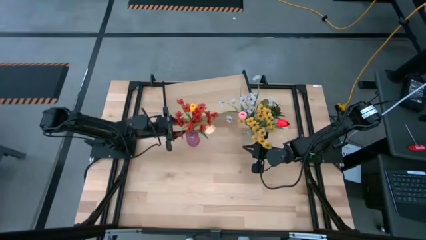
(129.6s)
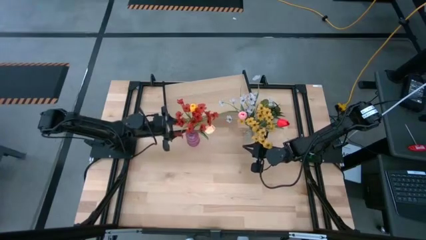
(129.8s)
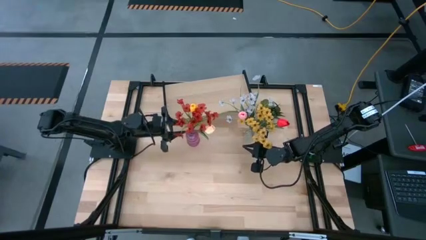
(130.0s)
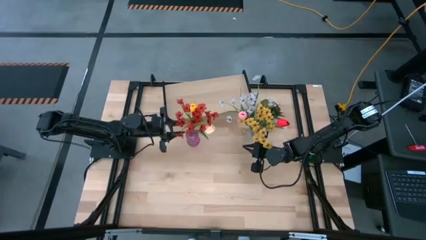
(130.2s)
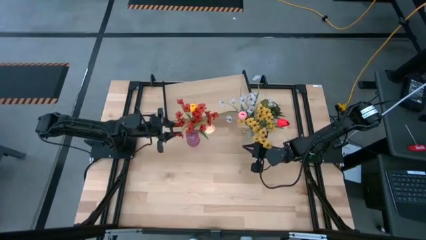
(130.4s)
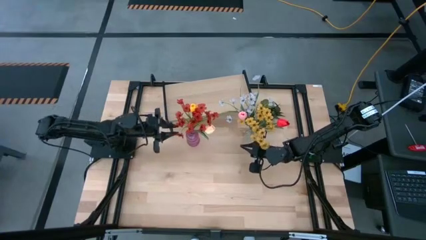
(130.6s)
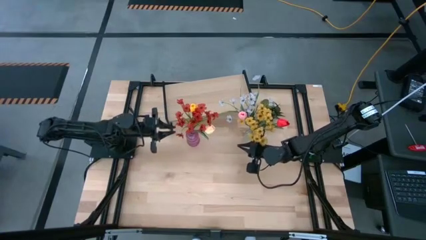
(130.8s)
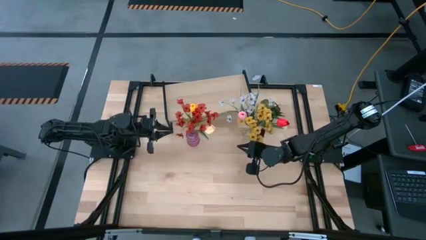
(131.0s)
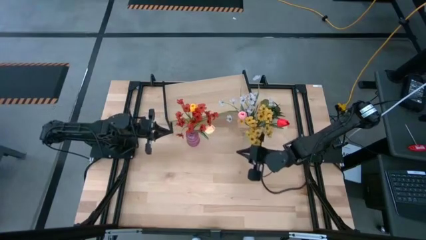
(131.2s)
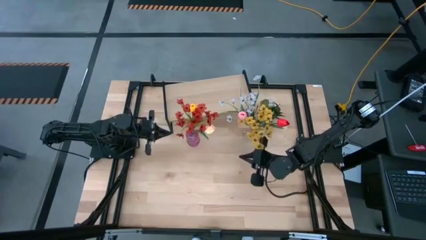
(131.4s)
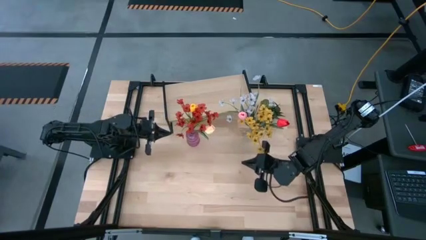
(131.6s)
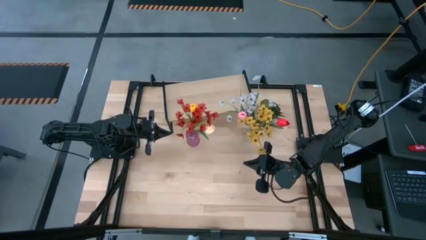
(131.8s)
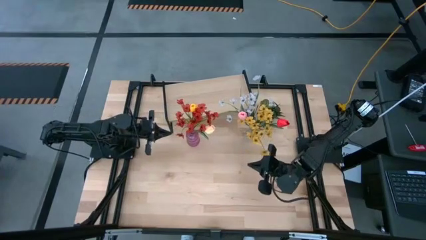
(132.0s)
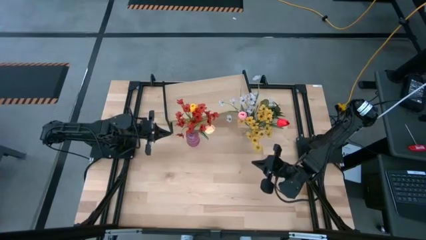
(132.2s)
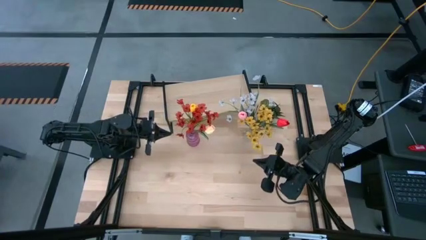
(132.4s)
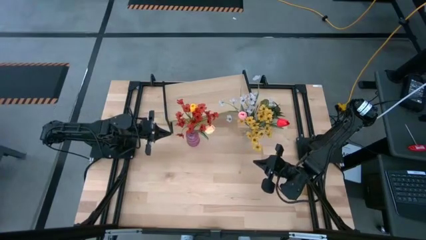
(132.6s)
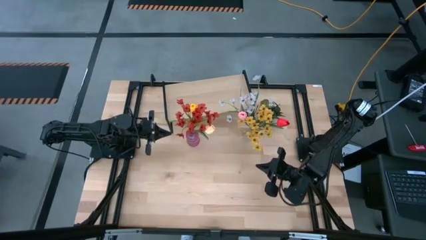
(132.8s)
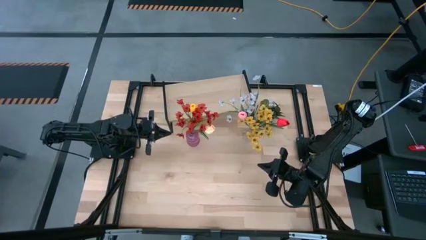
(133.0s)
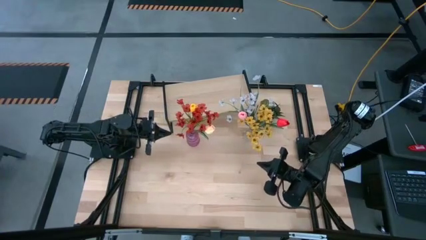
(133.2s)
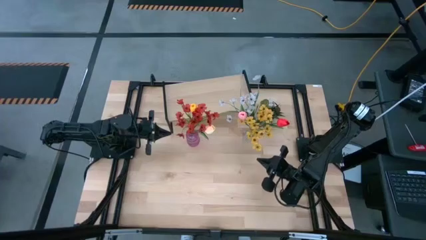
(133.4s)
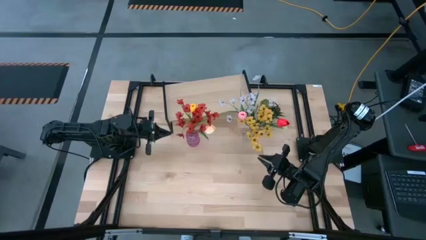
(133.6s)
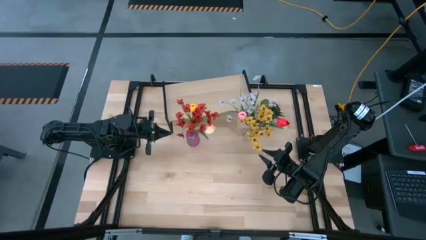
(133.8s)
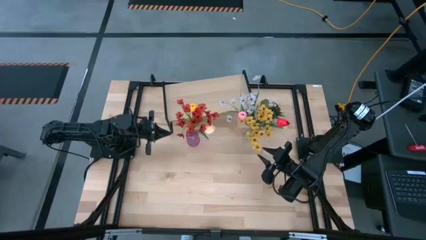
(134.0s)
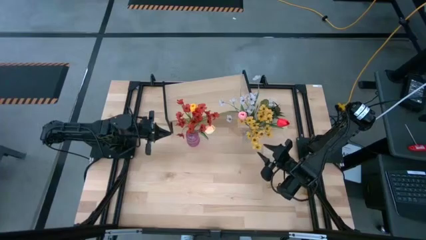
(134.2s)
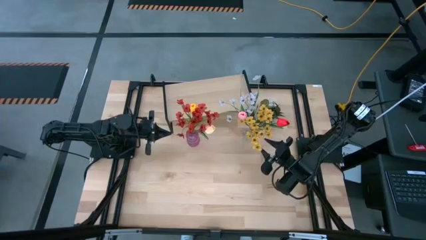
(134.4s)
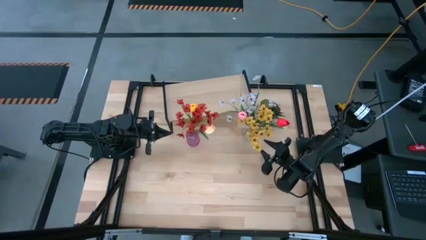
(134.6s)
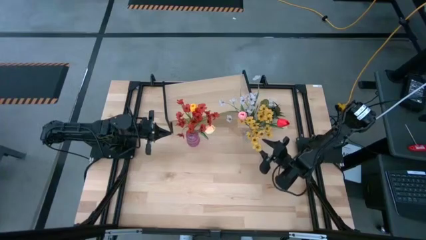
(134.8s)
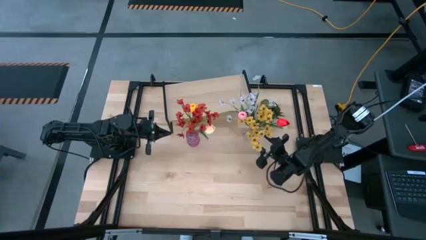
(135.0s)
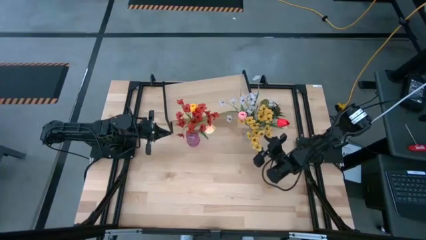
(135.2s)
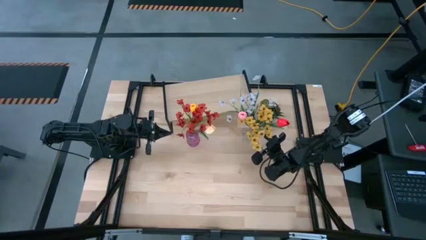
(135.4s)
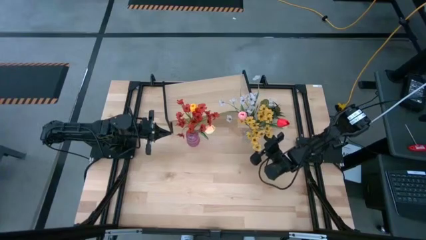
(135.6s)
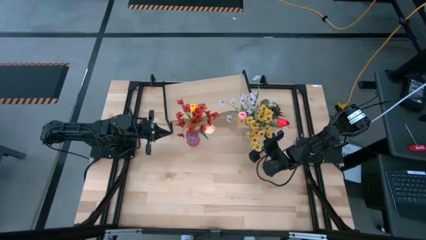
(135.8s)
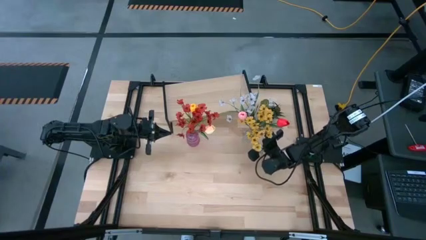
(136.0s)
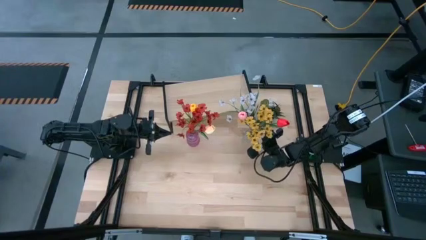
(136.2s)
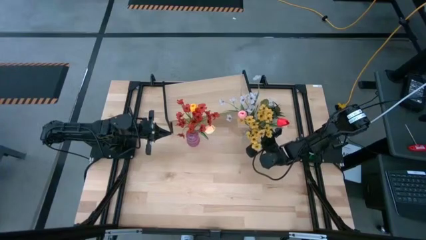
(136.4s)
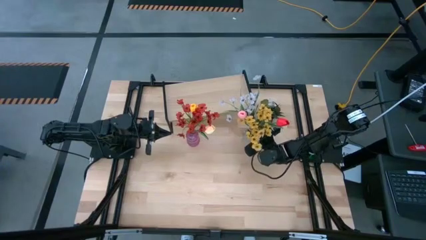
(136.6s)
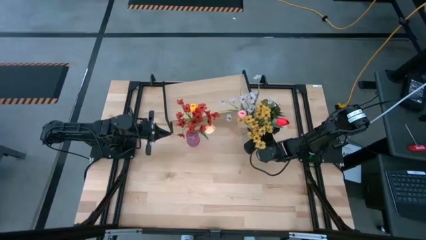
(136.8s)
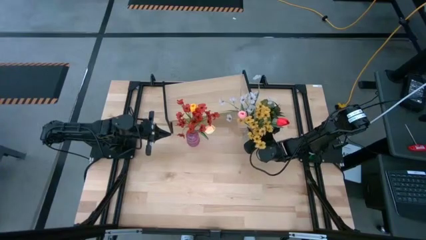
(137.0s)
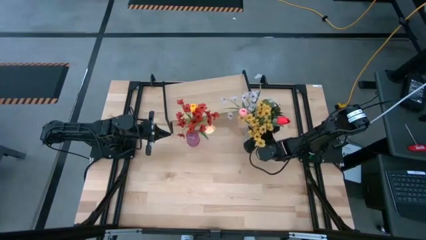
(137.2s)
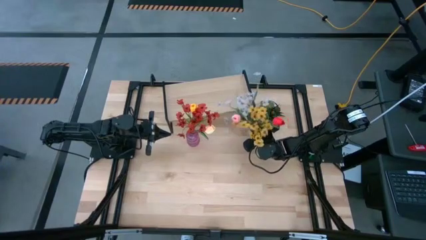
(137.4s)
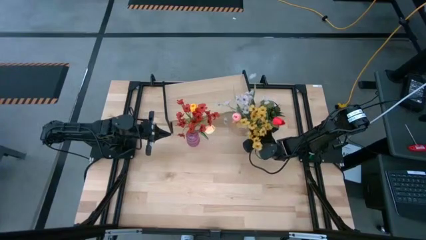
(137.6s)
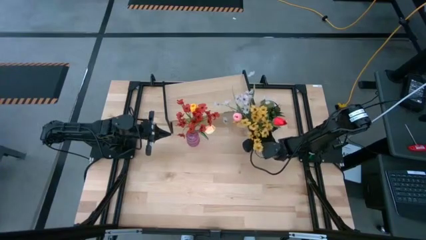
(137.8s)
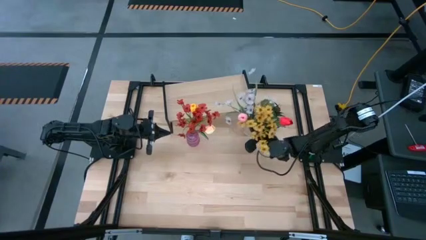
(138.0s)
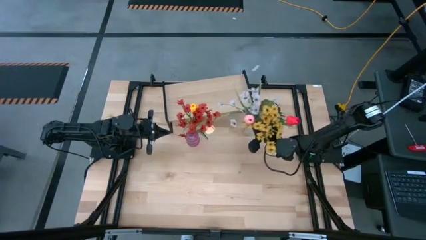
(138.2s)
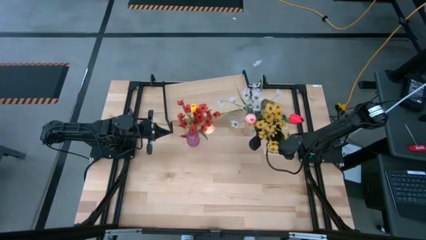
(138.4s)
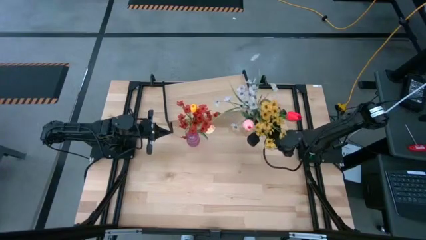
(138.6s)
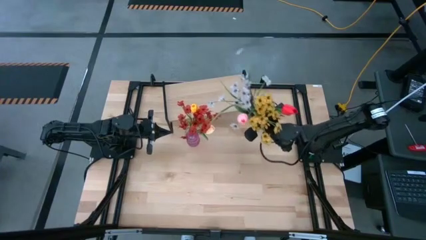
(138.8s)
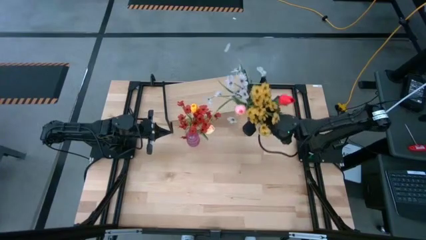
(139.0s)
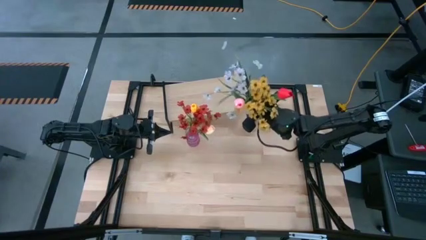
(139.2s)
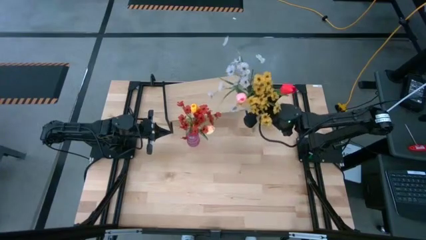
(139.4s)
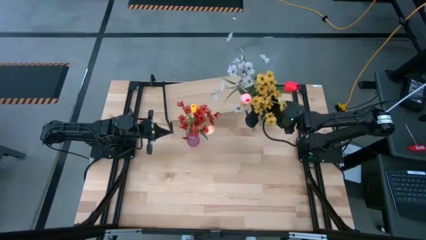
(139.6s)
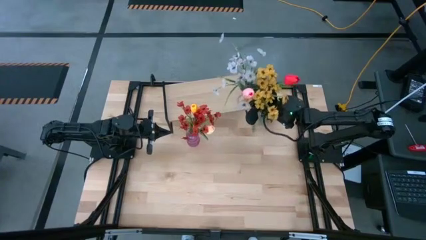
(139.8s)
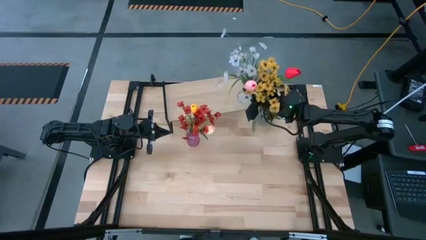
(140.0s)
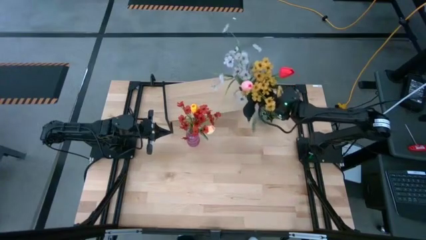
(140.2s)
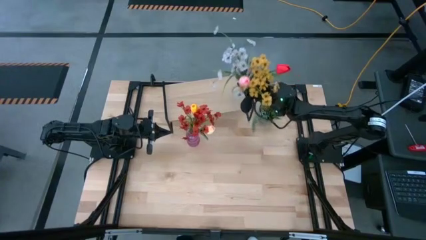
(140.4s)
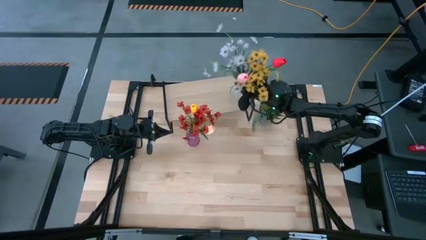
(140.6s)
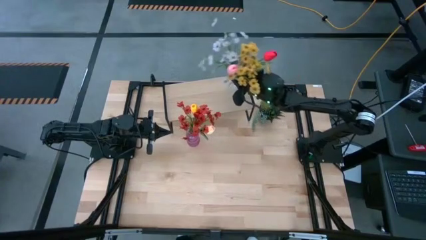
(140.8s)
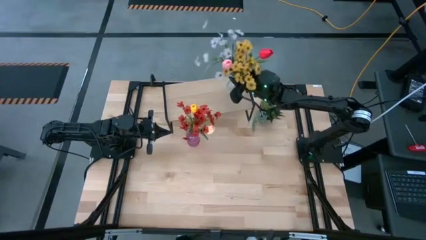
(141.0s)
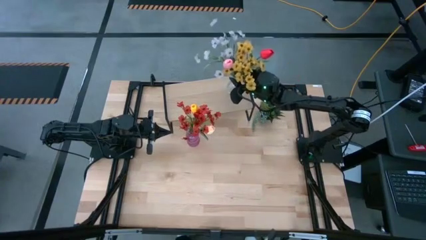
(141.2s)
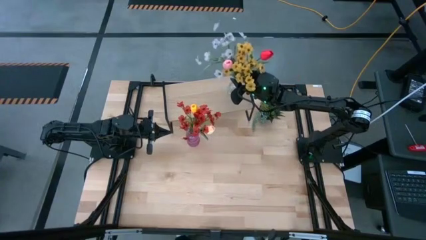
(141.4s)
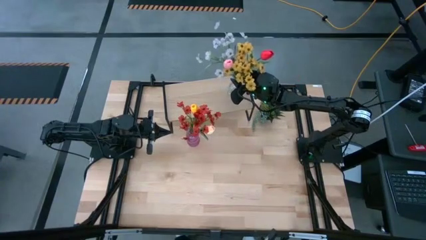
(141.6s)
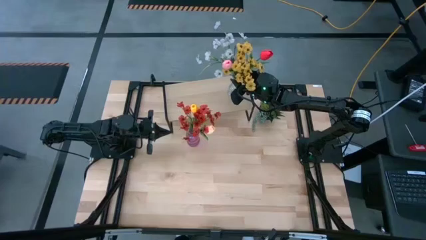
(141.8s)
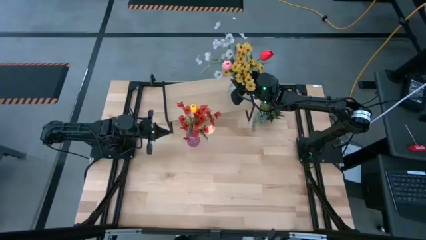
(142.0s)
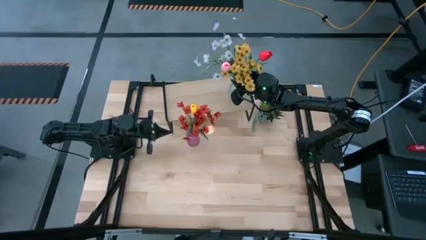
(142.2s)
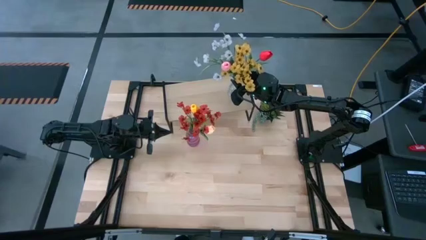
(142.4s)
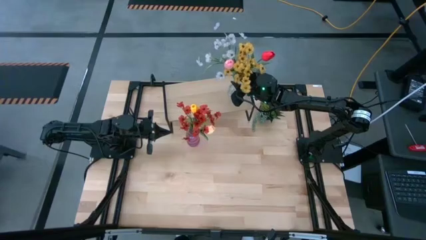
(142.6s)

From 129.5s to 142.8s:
Task: Pick and place flowers into a vace then onto a shelf
Put the transparent flower vase on the shelf

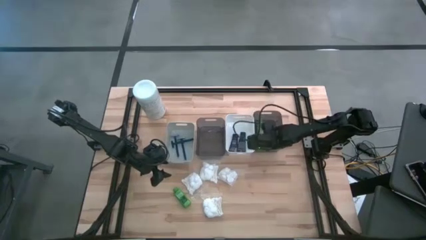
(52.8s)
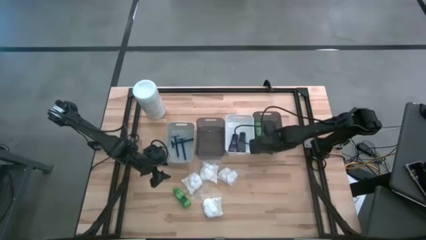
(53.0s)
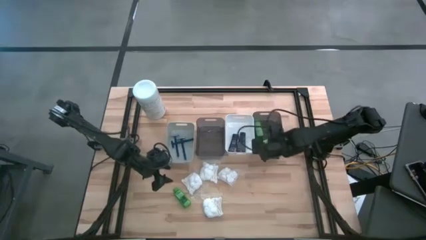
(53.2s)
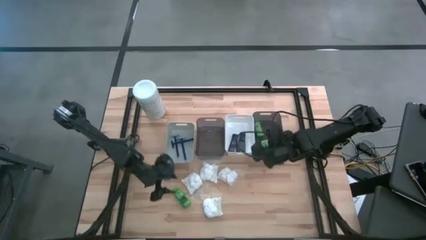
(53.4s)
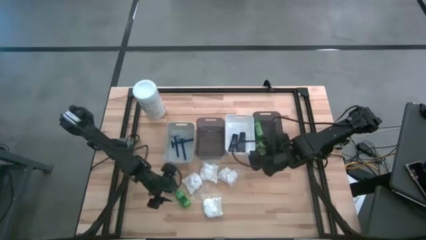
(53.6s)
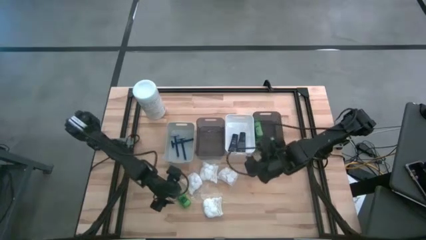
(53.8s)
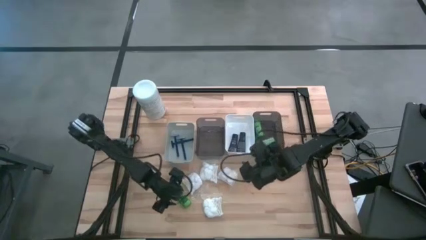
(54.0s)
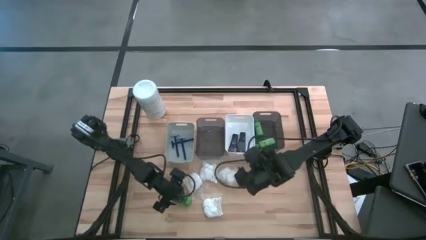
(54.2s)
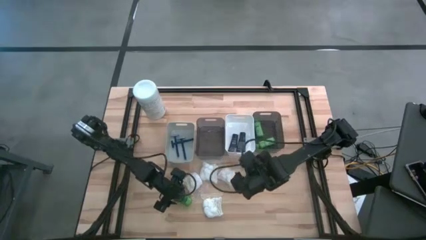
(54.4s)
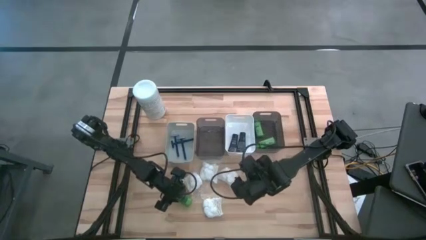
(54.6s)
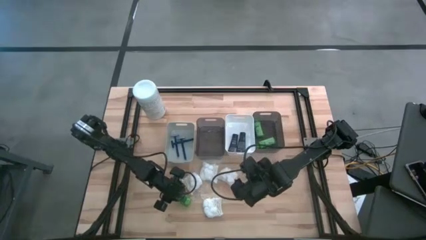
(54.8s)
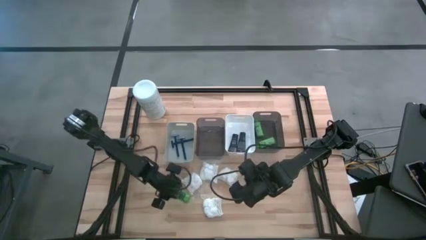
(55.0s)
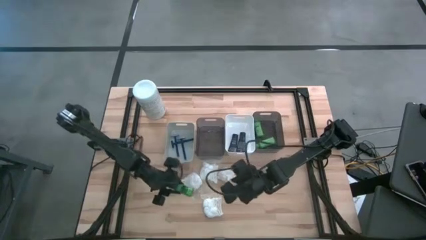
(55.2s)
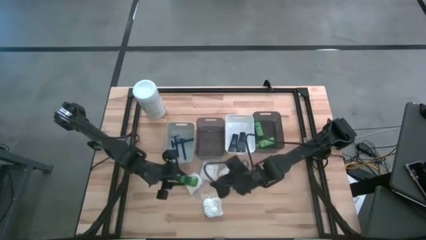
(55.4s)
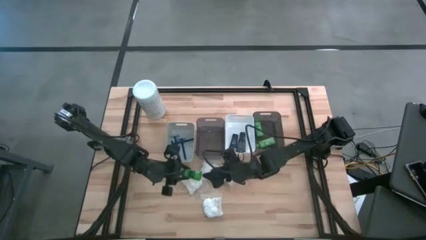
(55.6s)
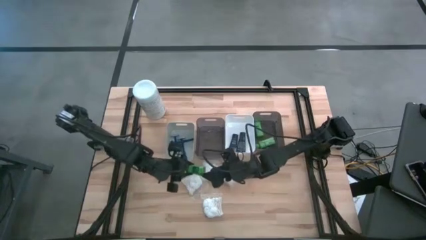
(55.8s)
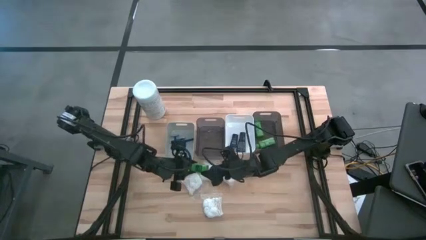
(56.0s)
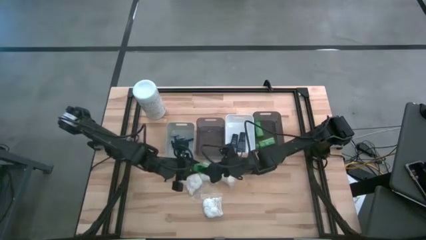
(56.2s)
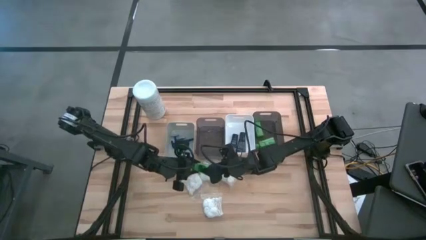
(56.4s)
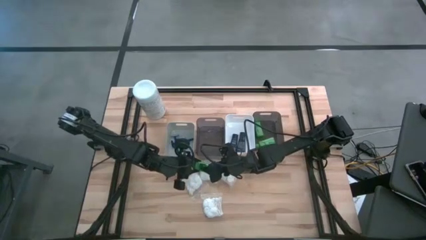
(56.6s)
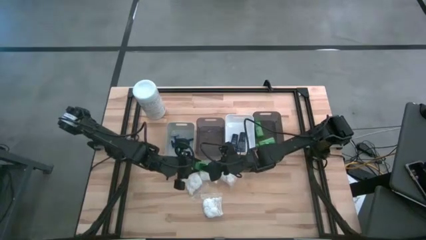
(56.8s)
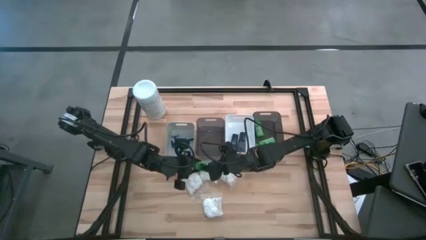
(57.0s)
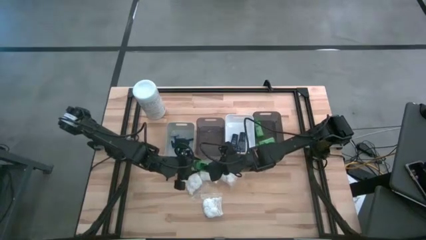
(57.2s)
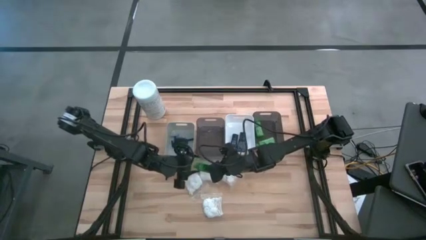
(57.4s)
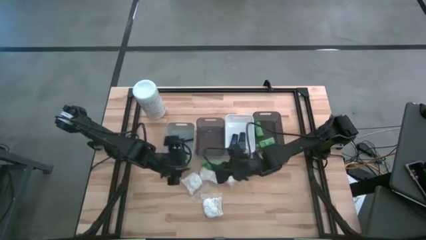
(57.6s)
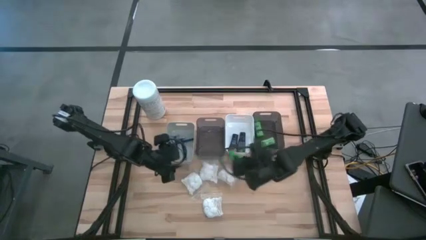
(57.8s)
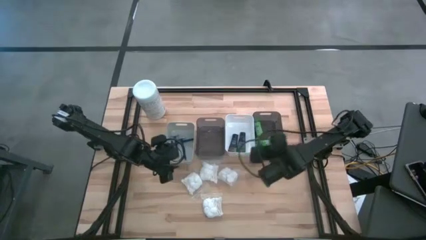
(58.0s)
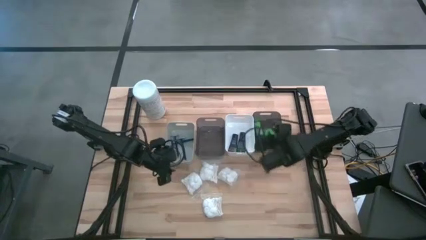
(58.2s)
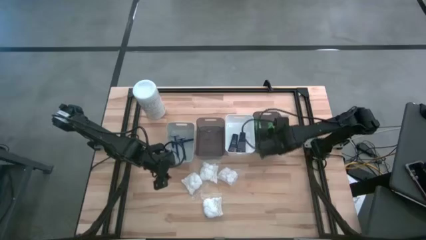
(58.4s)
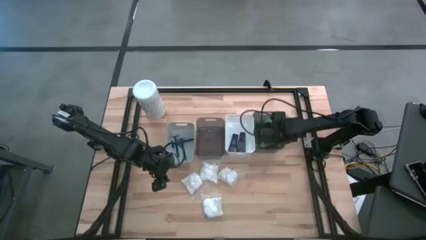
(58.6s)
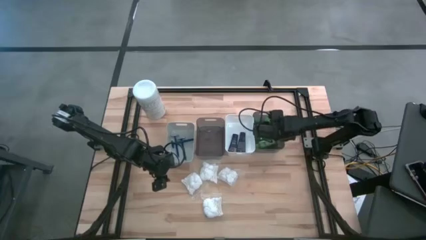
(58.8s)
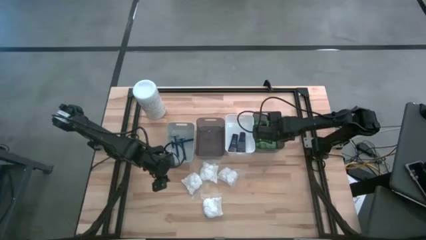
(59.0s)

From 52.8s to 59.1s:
Task: Pick & Place Travel size toiletries
Put the shampoo into the right black bin
